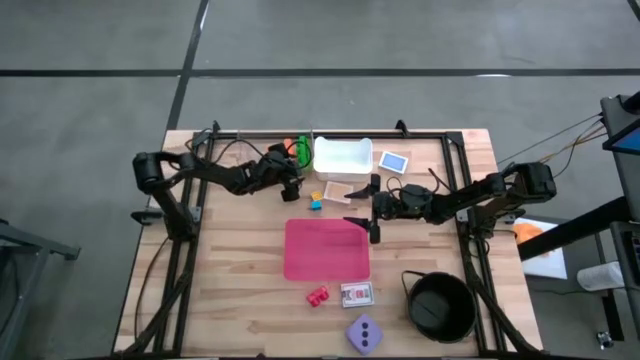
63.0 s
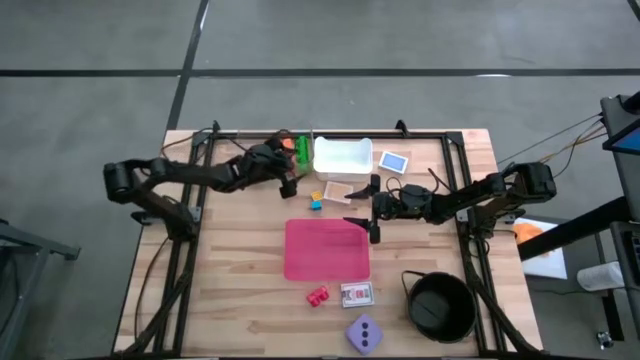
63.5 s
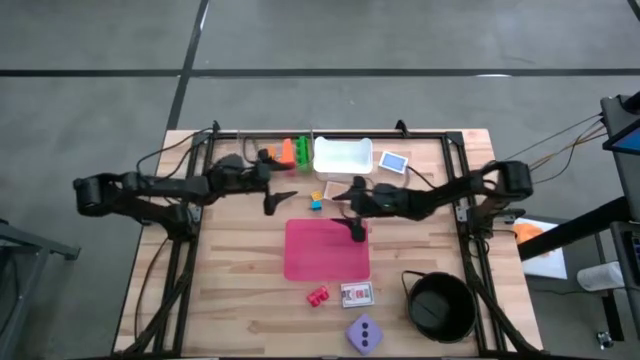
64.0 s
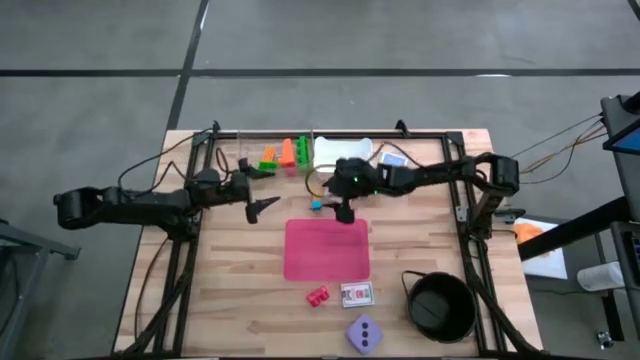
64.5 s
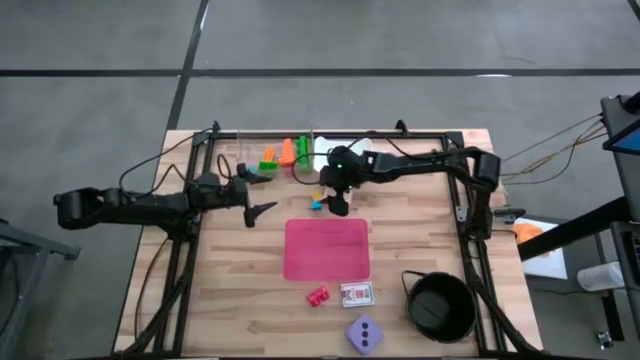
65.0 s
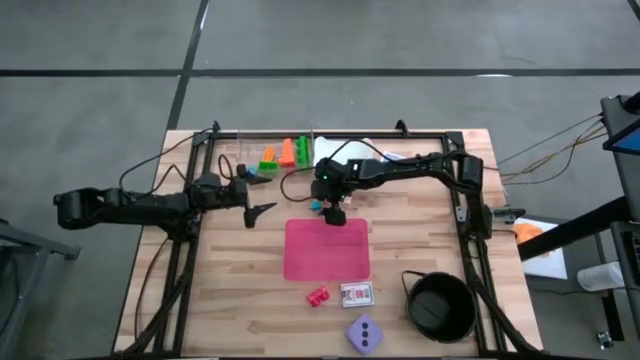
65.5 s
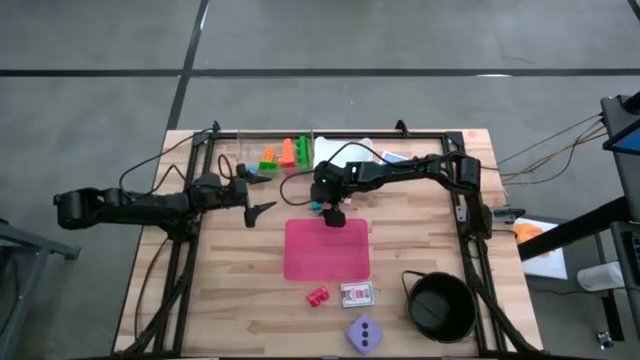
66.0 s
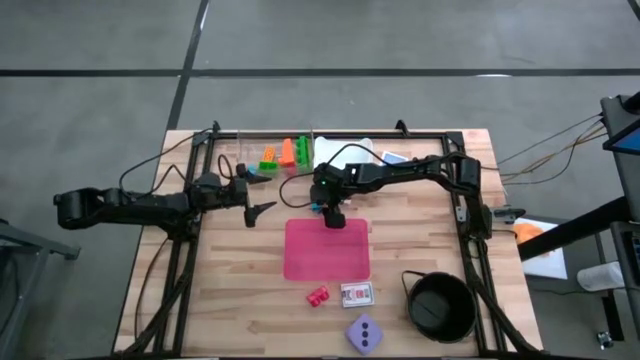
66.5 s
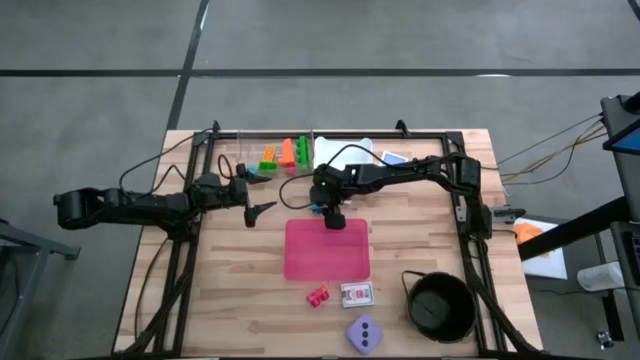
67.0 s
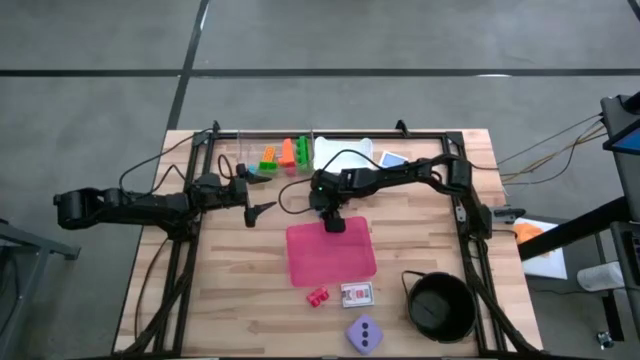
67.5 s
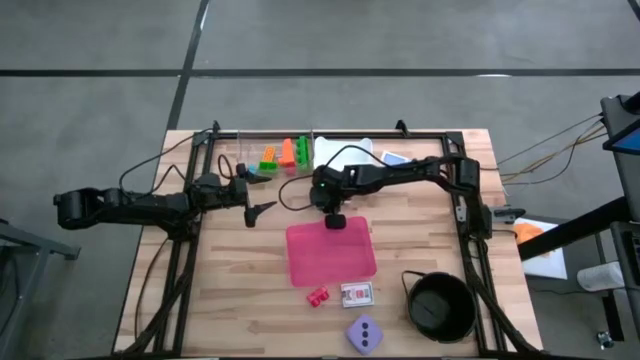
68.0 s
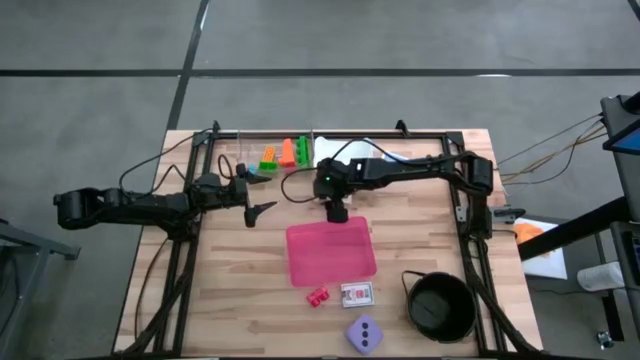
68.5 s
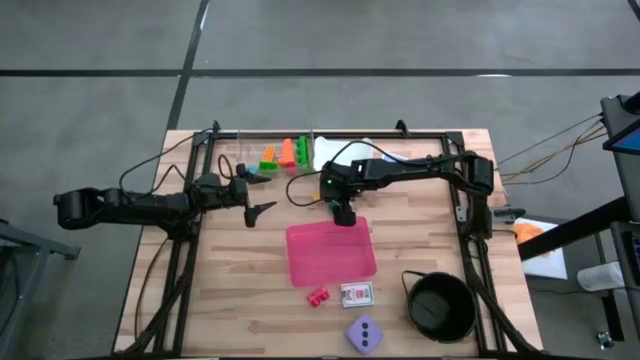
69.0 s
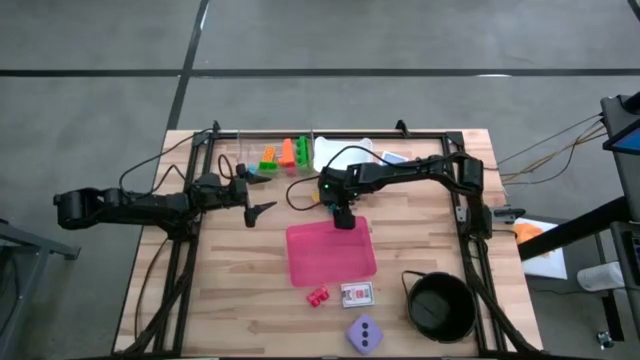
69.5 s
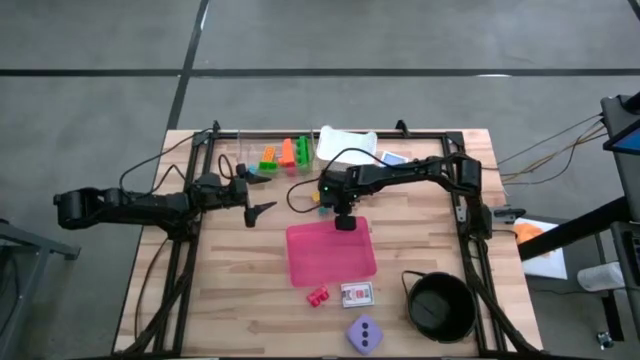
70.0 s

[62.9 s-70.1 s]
Task: Pick & Place Toys
Put the blue game piece into the transparent bin

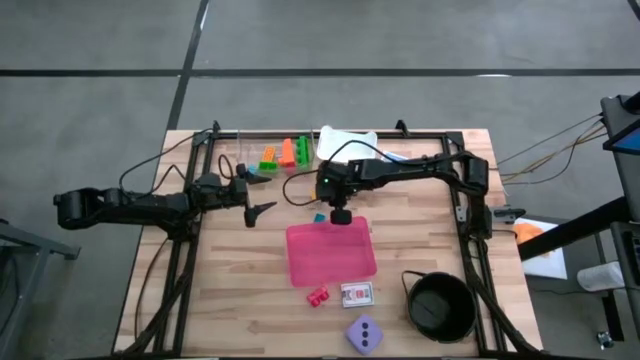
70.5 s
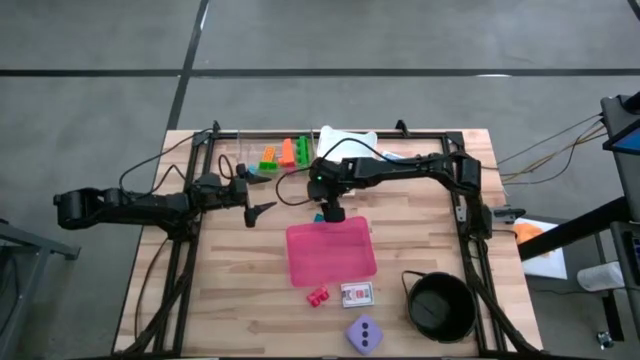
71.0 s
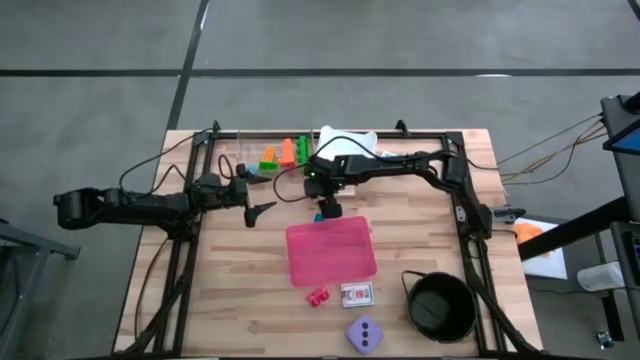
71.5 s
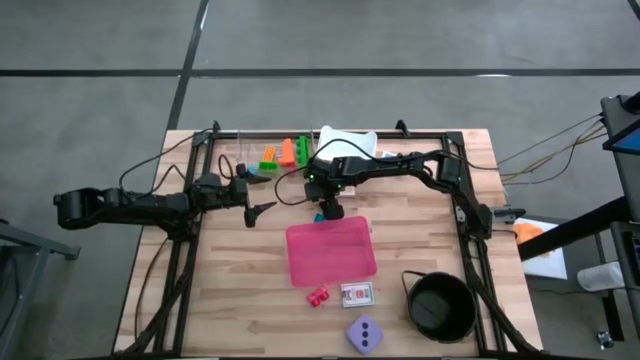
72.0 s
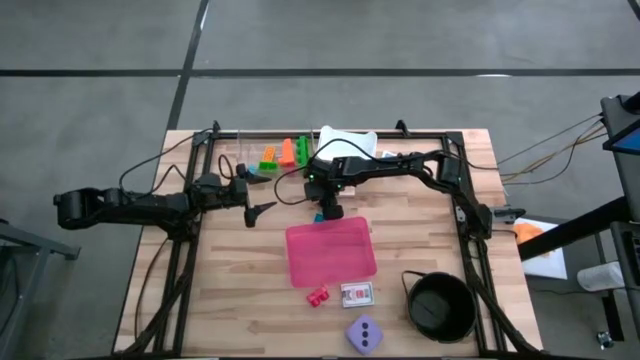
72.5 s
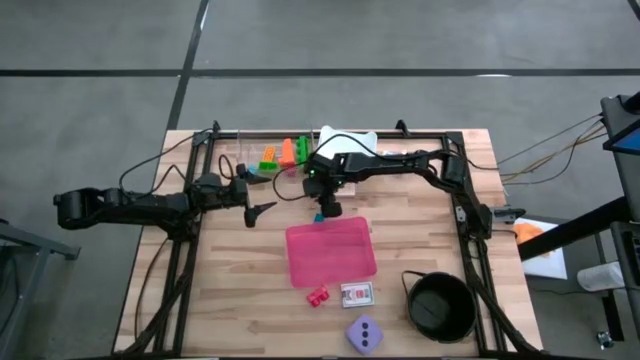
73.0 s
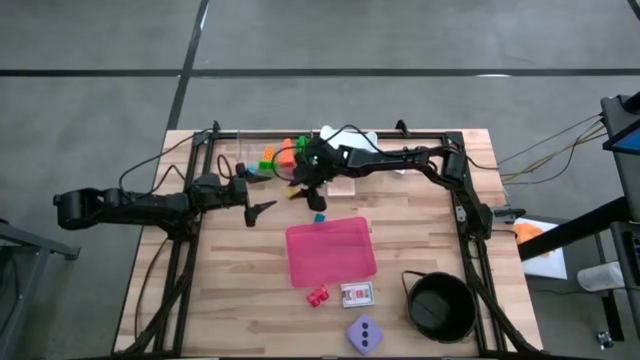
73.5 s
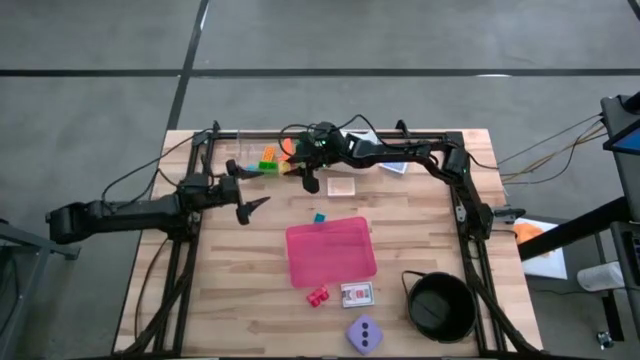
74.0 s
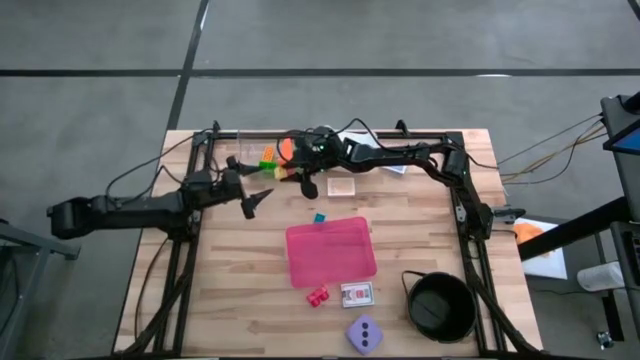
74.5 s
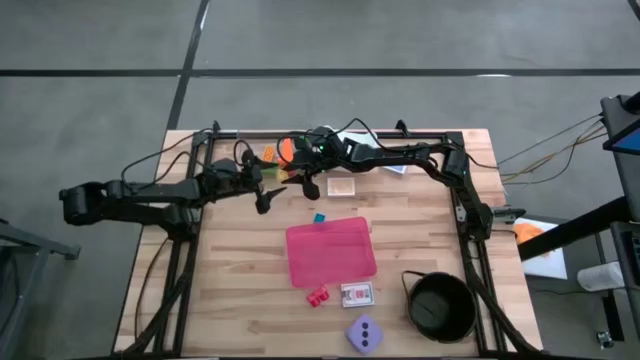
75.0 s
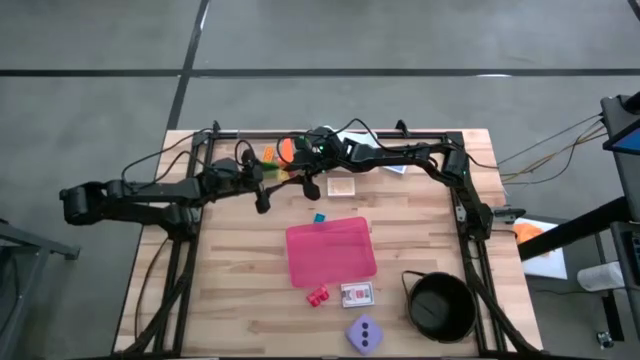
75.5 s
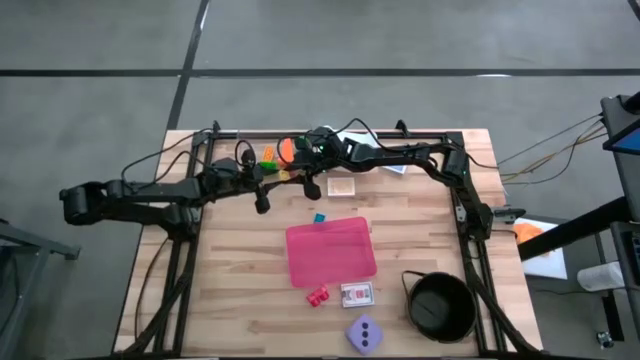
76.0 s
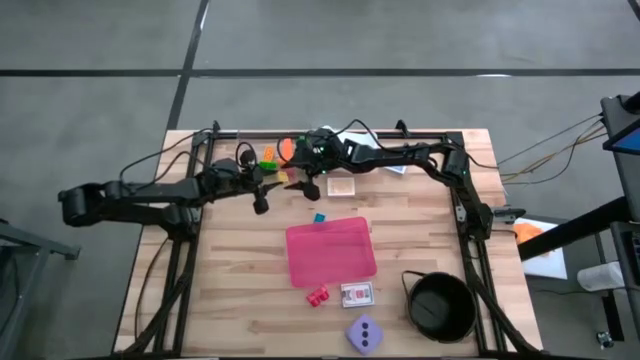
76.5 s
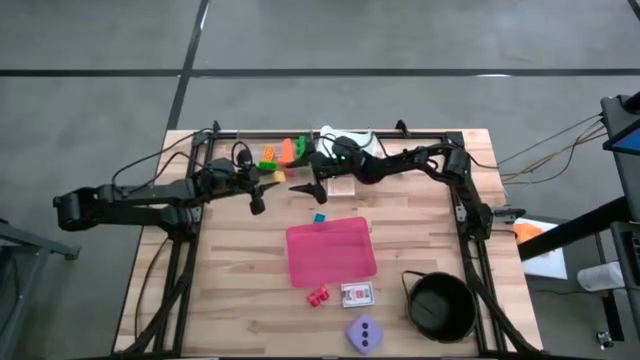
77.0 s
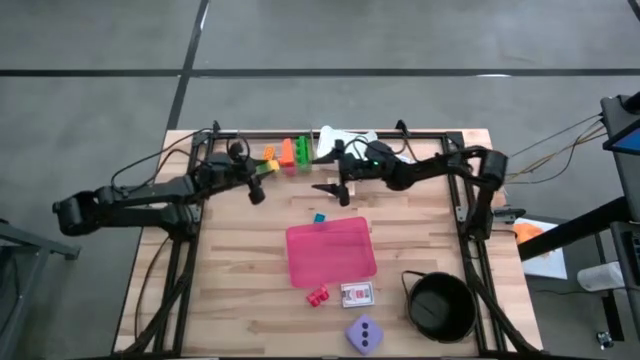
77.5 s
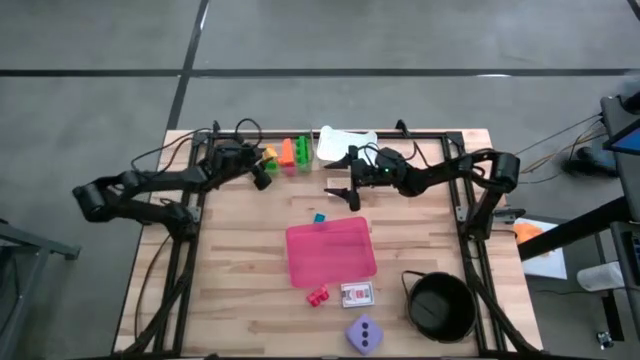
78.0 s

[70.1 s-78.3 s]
Put the yellow game piece into the transparent bin

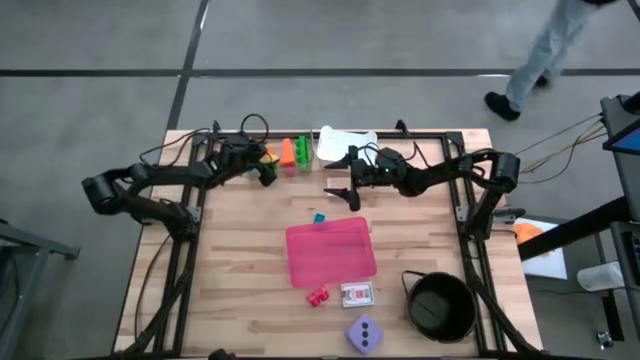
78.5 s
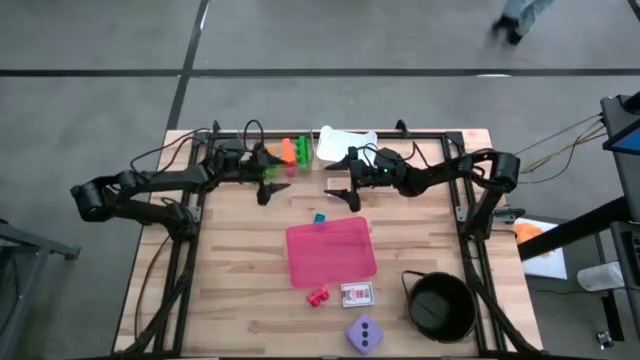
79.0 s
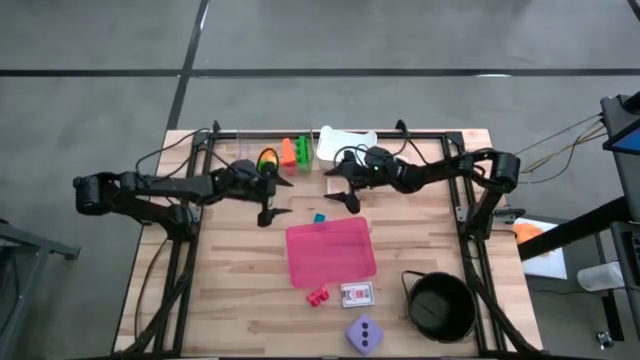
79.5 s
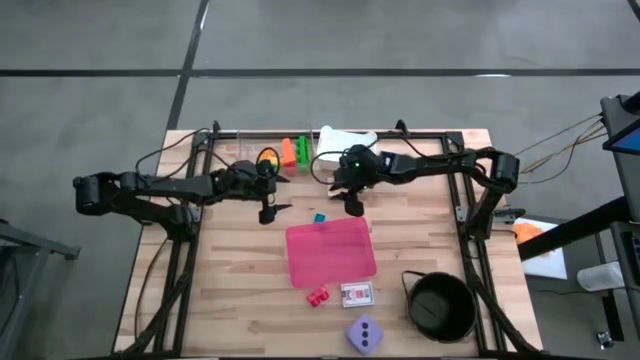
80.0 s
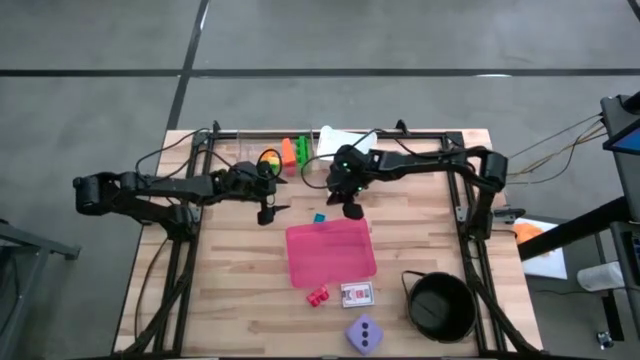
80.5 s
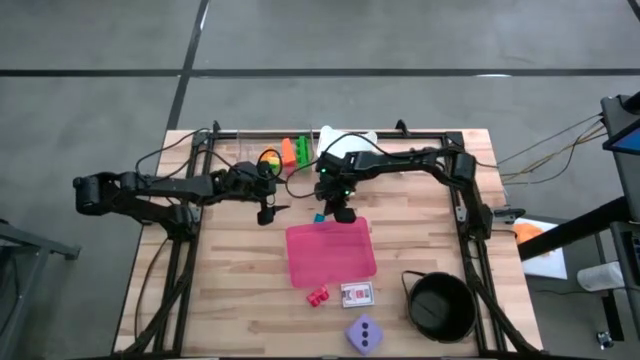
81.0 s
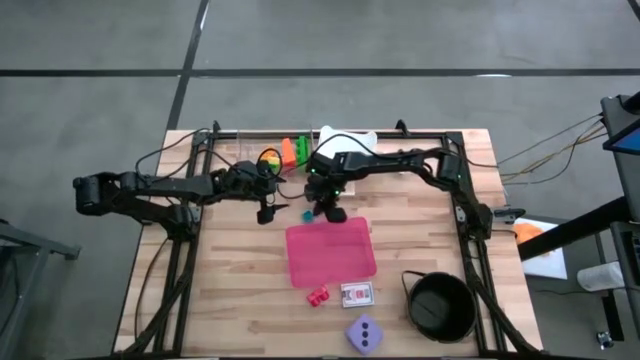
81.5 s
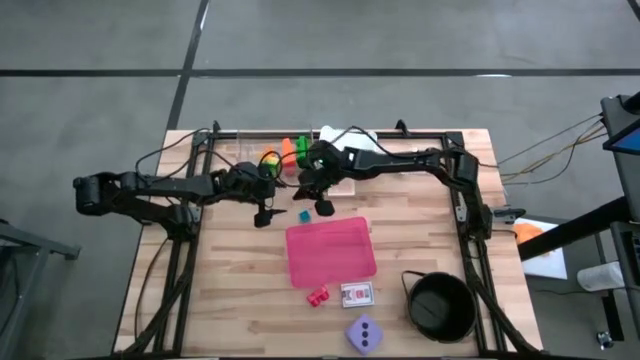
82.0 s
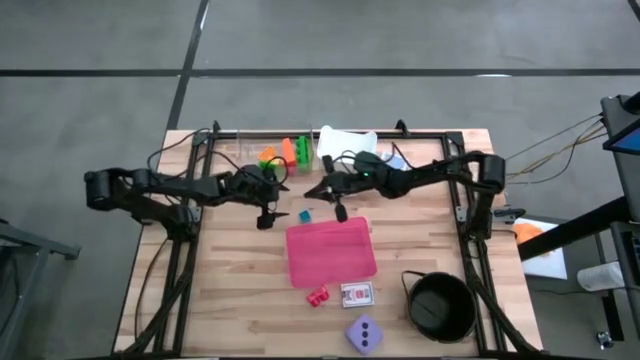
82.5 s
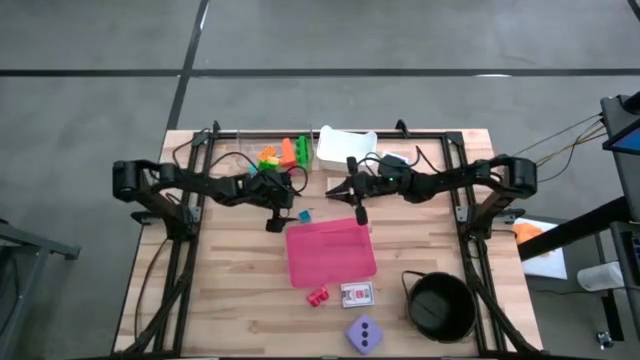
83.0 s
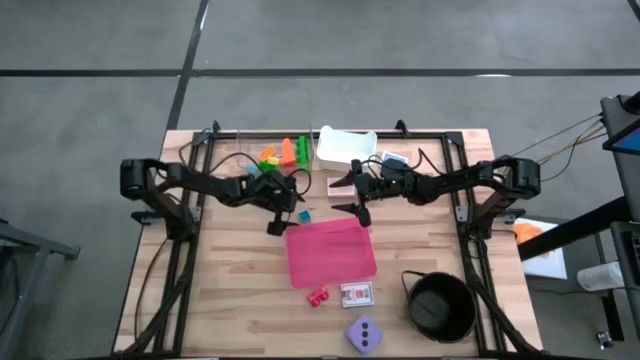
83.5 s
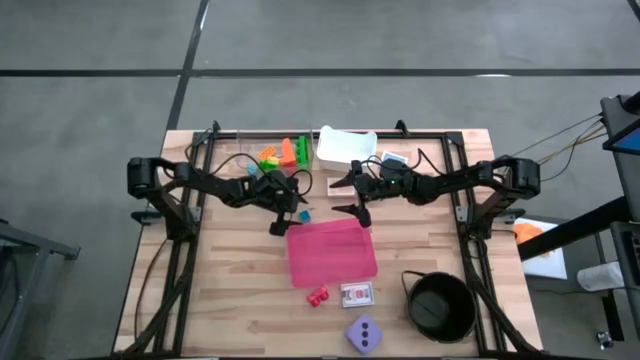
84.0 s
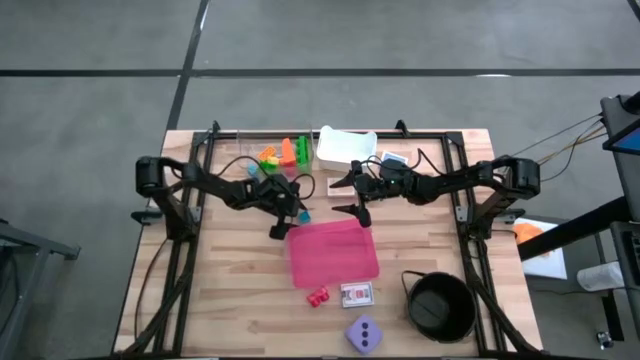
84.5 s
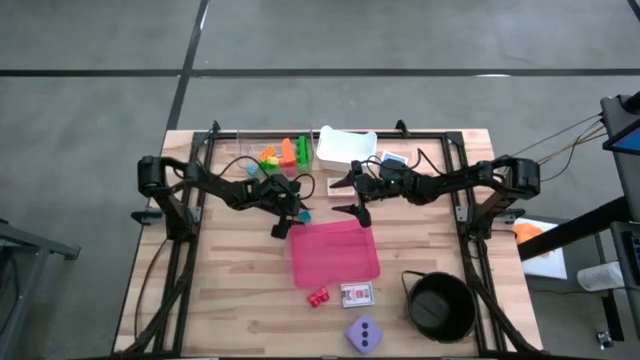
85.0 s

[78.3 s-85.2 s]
Put the blue game piece into the transparent bin
